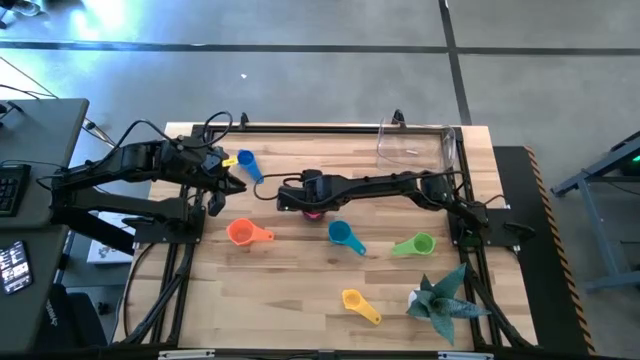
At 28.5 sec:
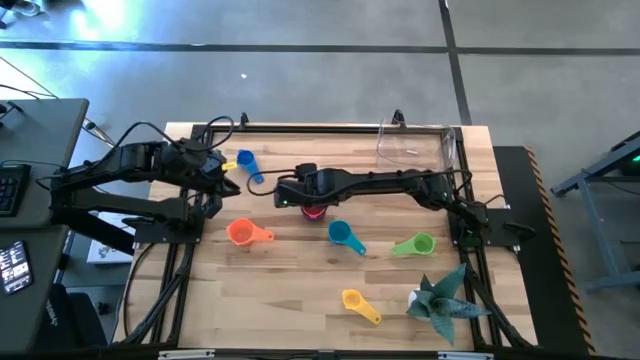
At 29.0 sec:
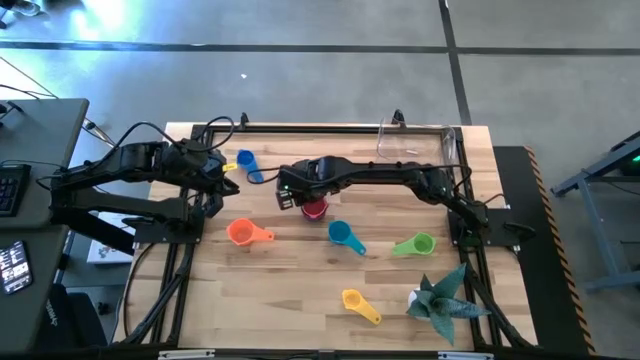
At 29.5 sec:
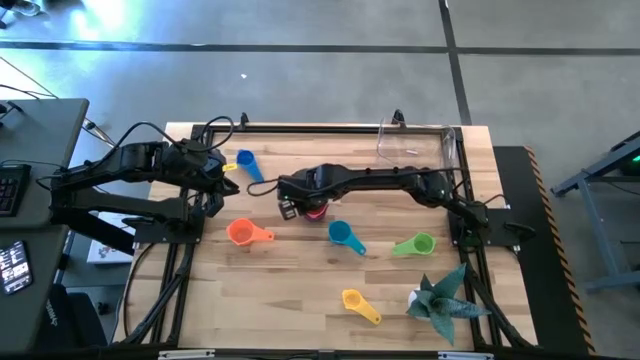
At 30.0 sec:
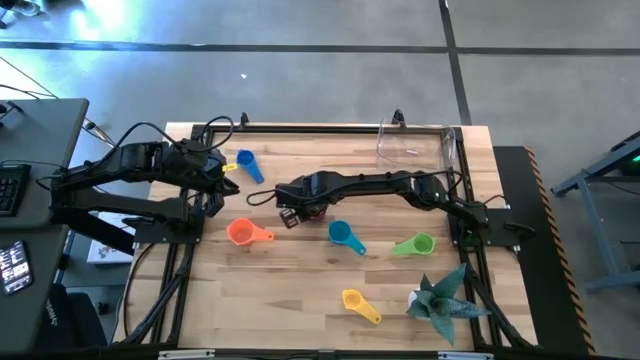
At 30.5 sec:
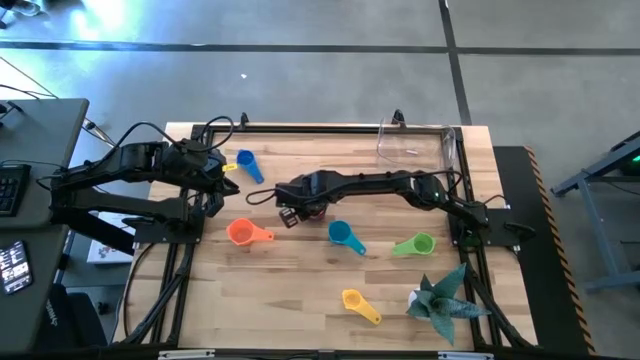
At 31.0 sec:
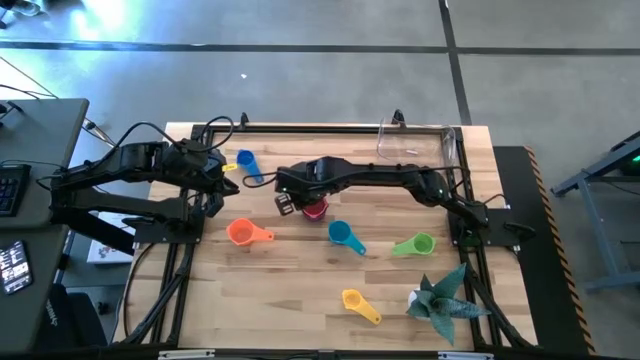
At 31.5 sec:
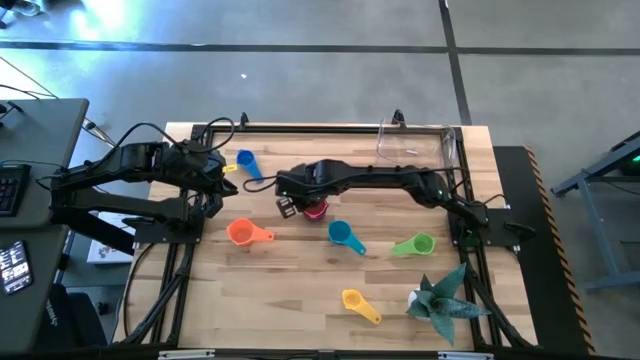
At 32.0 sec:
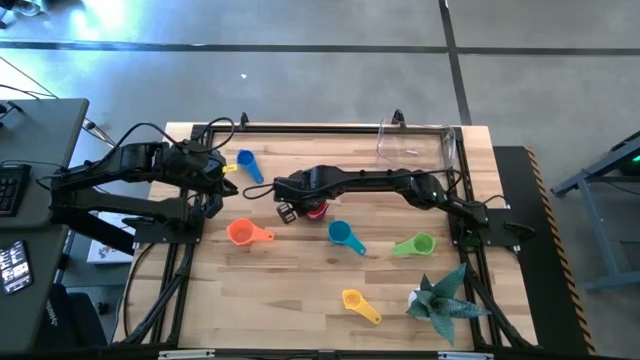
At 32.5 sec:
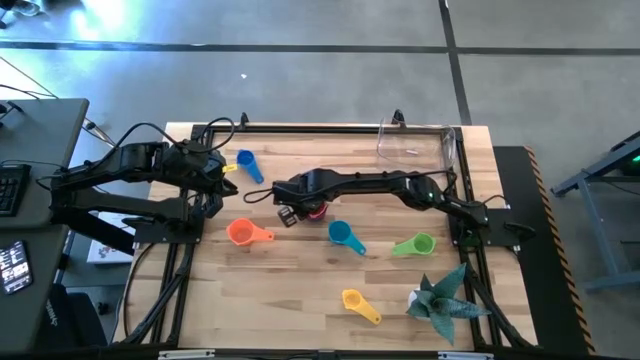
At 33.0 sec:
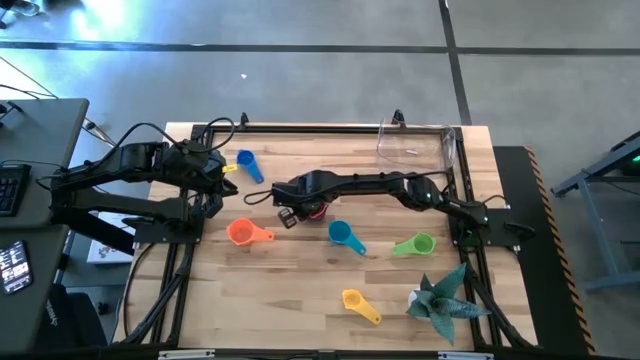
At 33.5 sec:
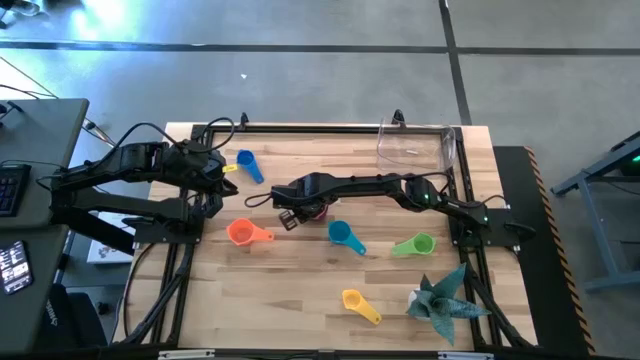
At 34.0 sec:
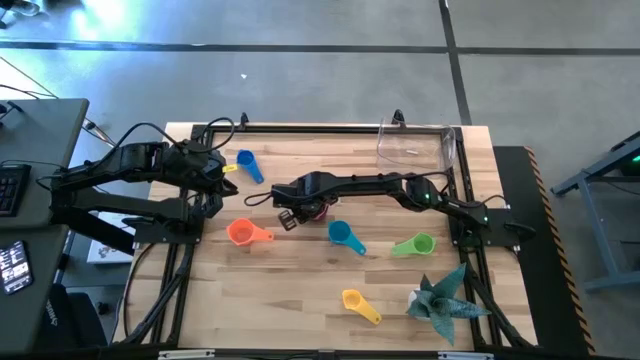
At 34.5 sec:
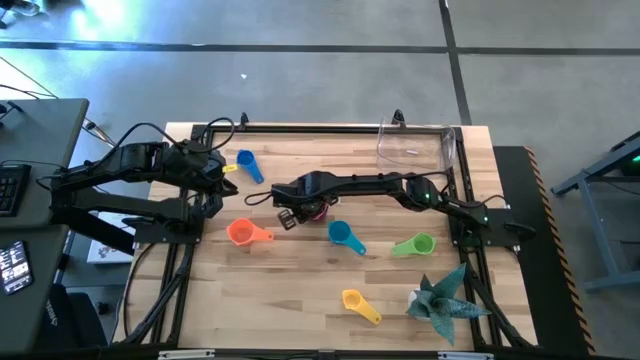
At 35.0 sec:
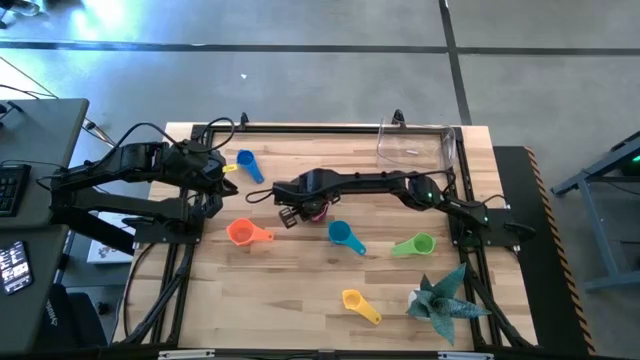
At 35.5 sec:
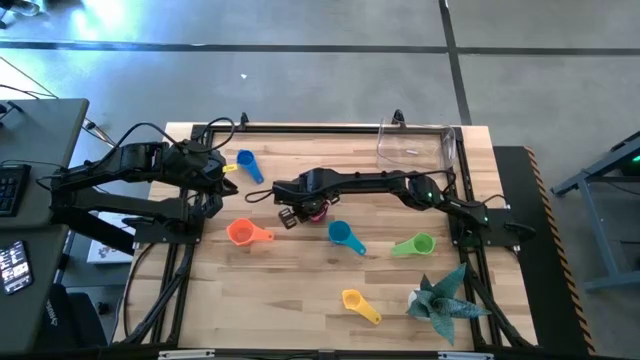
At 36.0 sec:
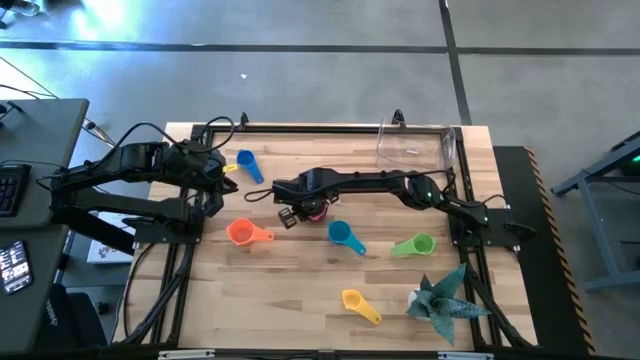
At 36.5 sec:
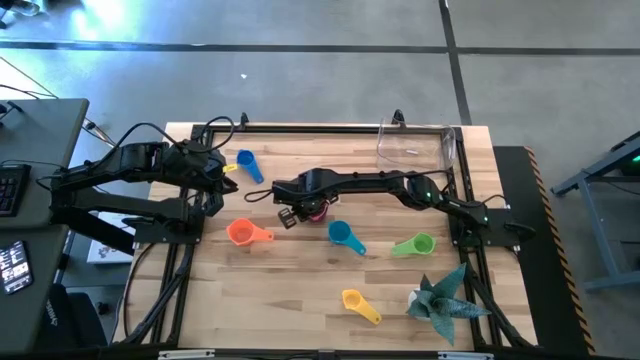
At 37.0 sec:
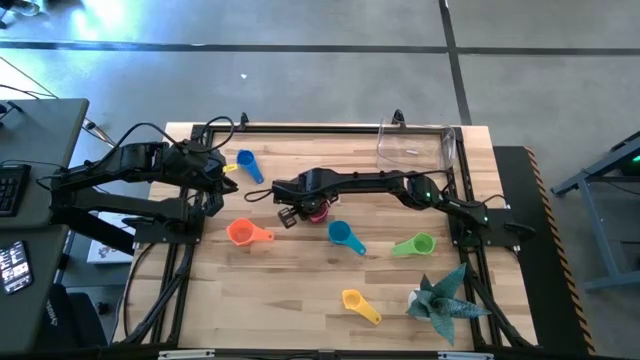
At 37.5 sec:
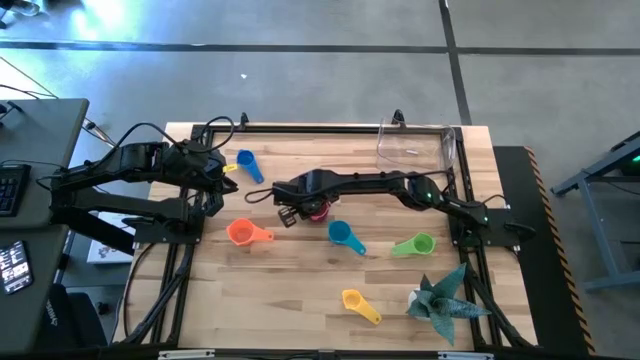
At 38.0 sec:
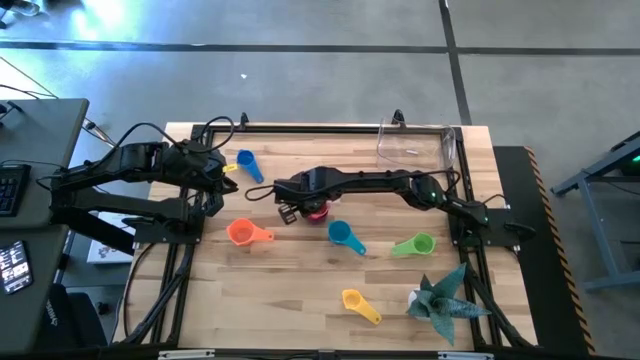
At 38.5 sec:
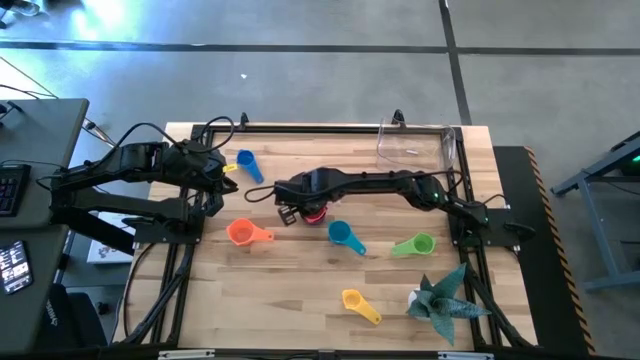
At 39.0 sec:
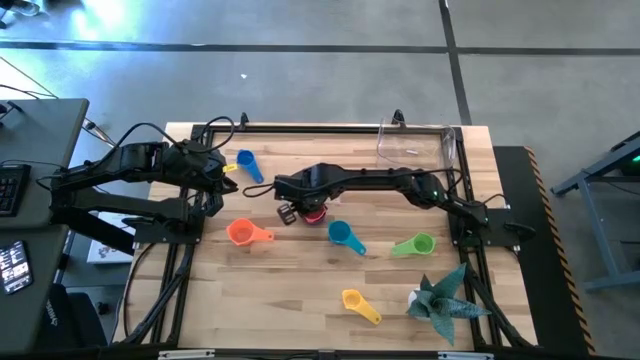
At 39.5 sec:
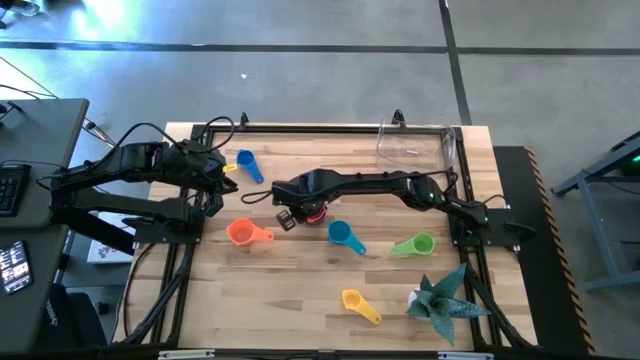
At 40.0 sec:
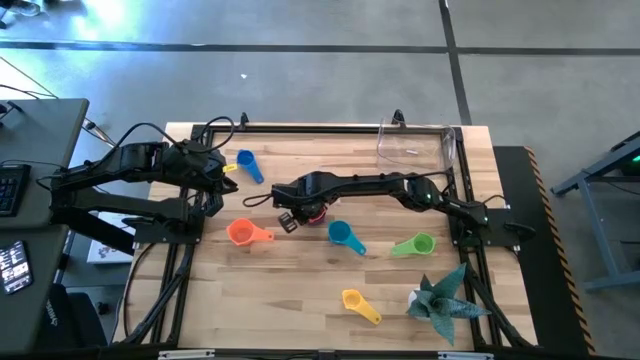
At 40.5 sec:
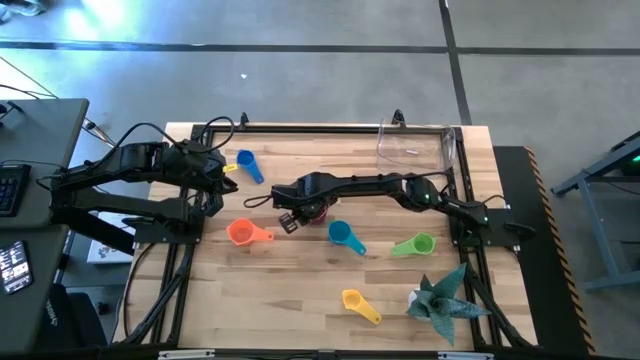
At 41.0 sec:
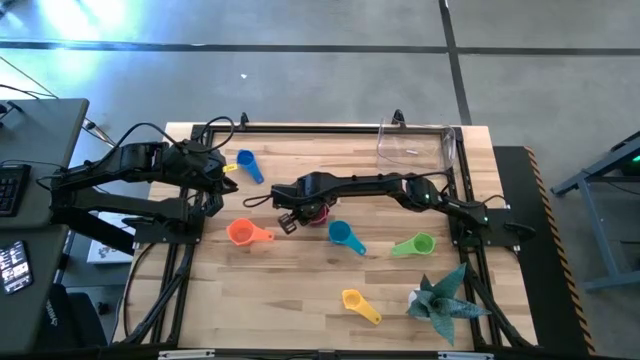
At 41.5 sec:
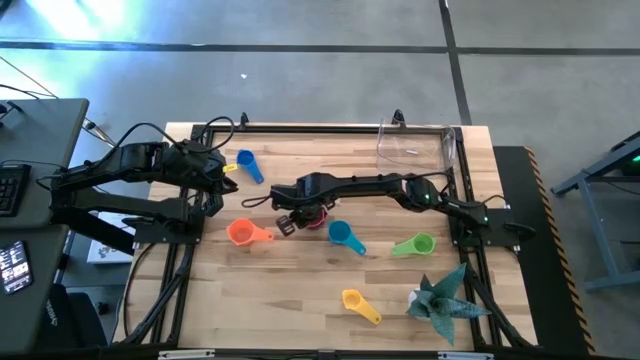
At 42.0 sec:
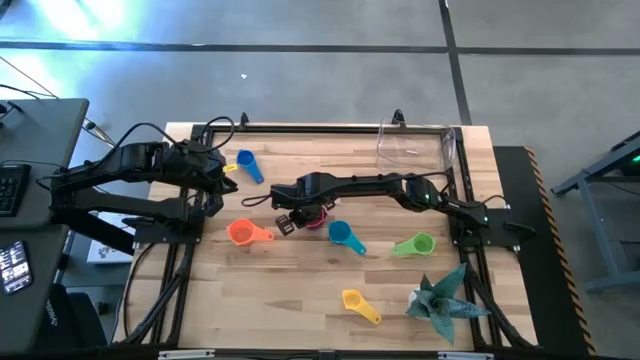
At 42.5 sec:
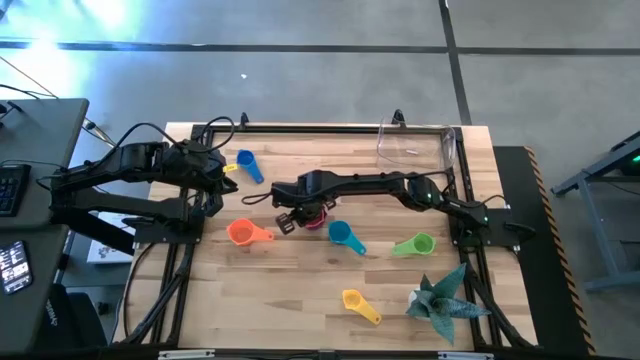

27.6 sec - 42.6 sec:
Task: Nest measuring cups in basket
Remove the red measuring cup from the dark blue measuring cup

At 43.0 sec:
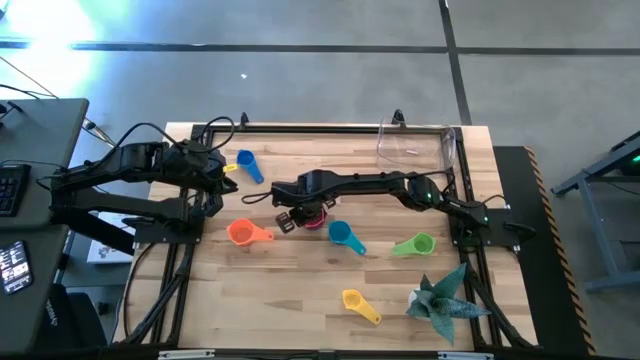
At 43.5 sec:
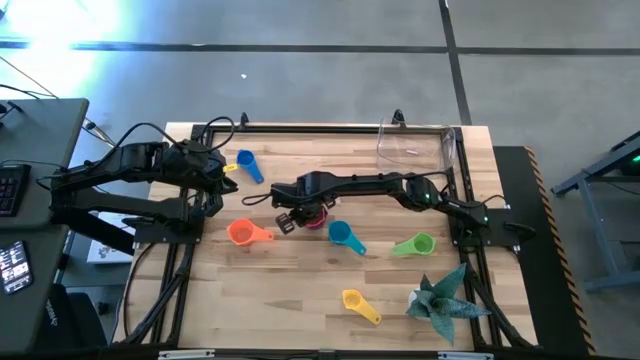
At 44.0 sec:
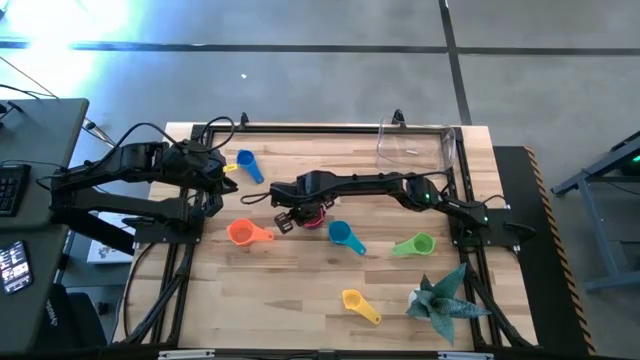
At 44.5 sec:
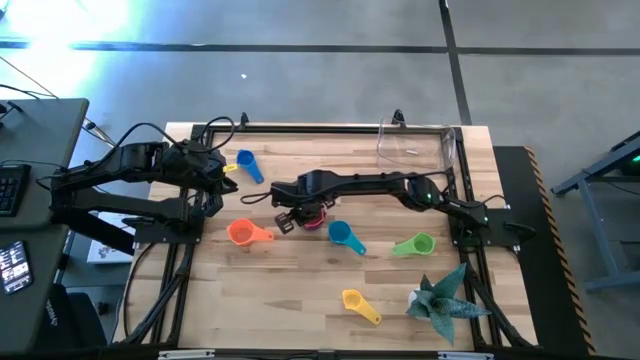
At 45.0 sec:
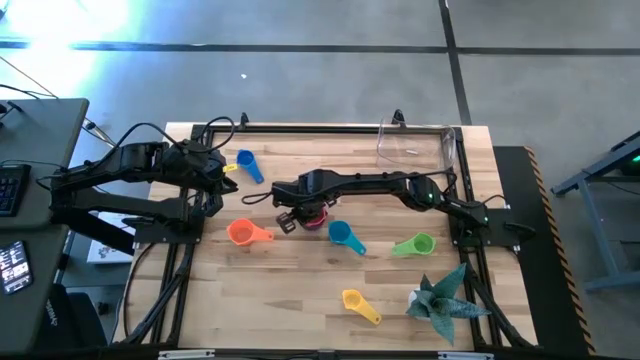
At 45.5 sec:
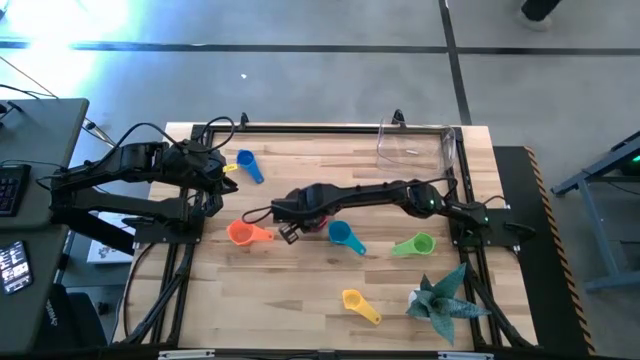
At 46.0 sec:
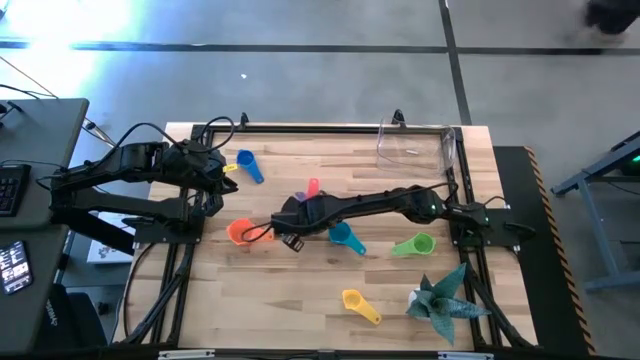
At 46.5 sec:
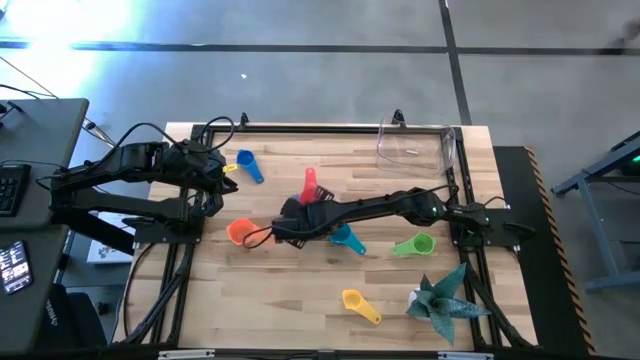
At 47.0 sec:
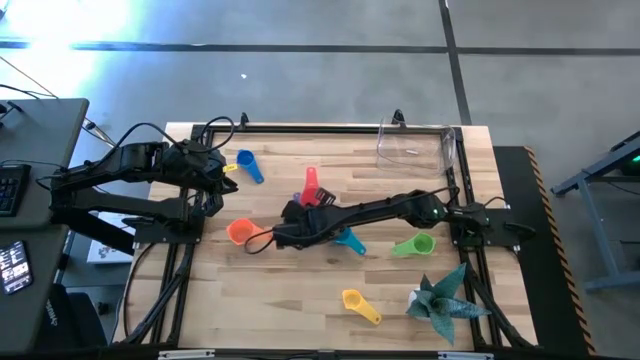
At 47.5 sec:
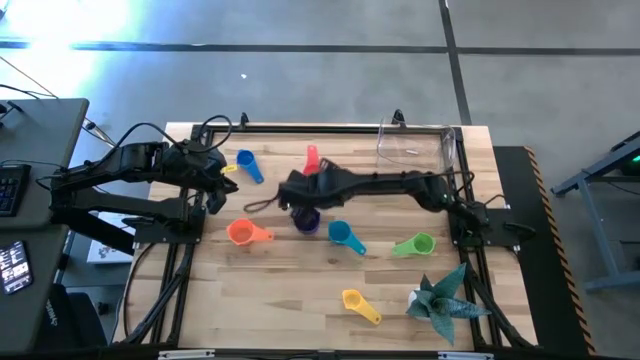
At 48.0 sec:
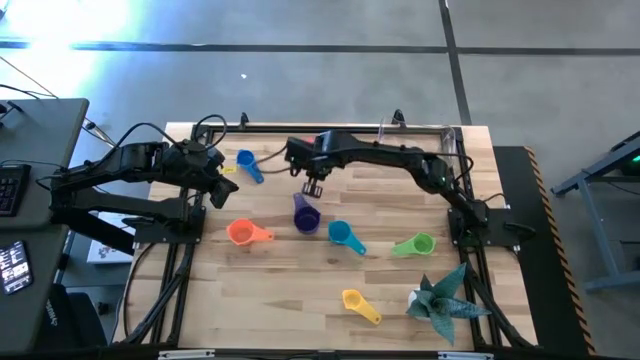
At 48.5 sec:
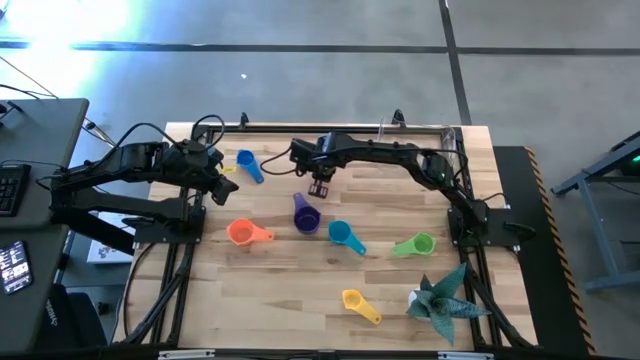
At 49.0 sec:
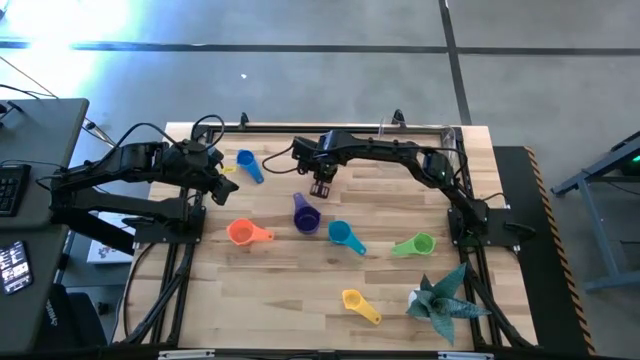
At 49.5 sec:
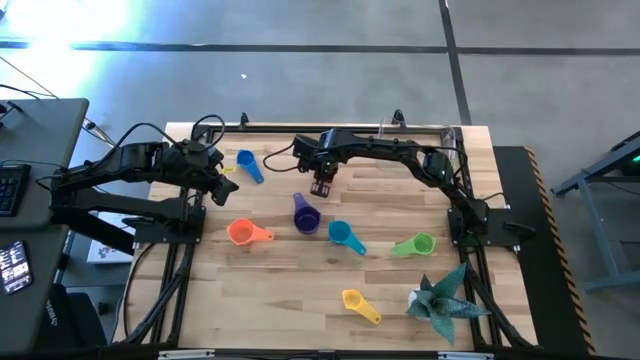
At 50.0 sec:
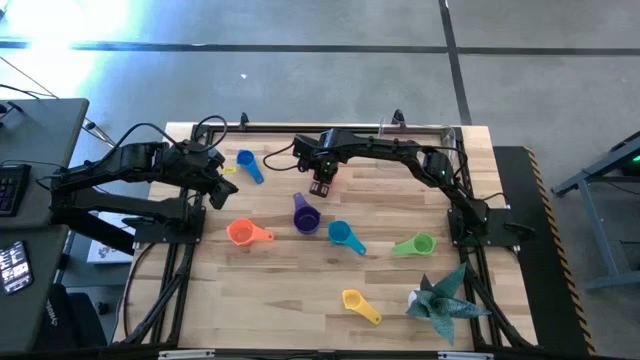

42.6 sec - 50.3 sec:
Remove the red measuring cup from the dark blue measuring cup
